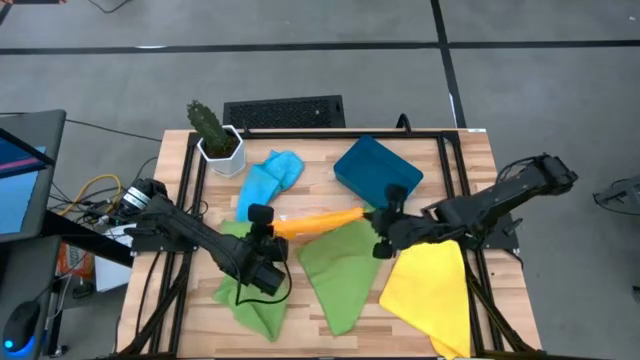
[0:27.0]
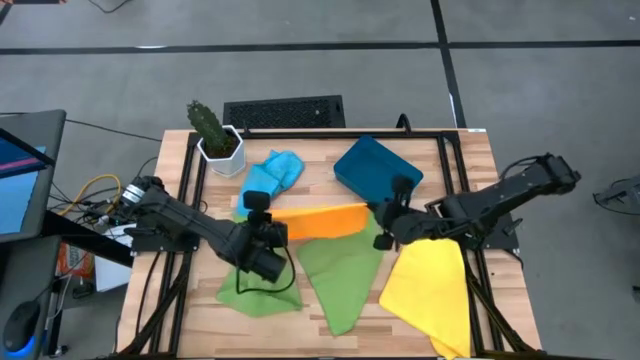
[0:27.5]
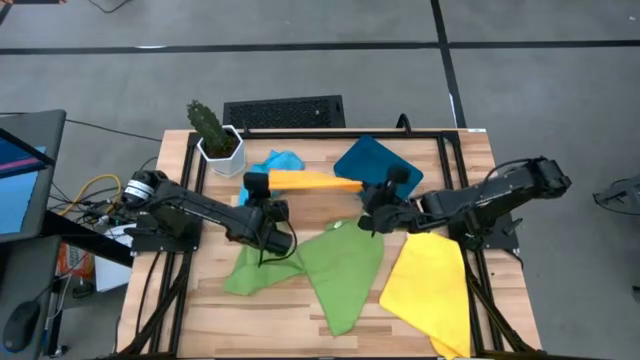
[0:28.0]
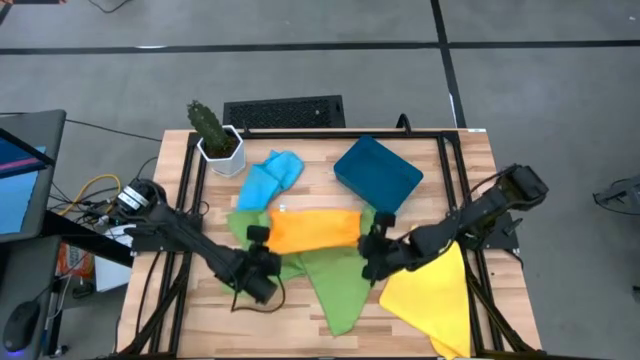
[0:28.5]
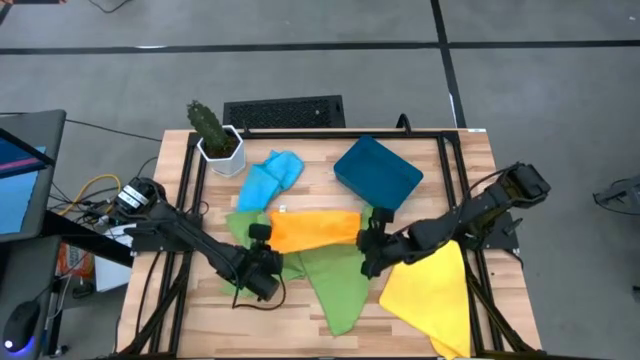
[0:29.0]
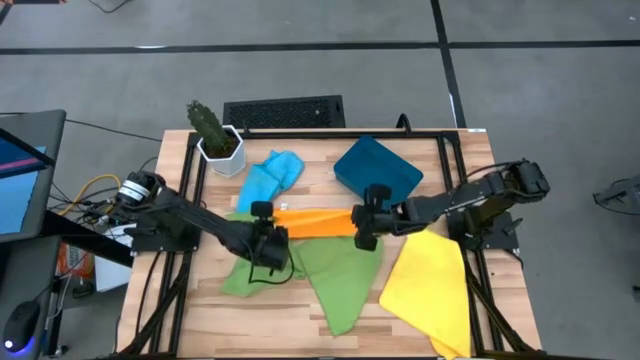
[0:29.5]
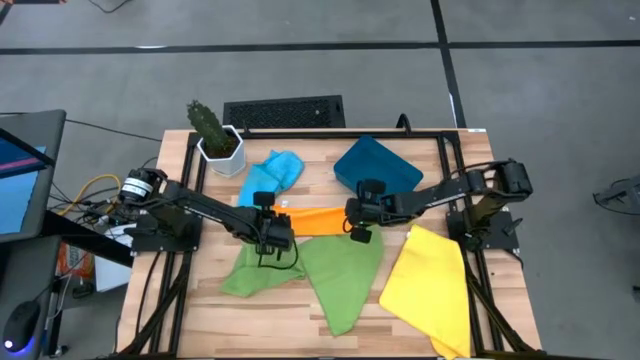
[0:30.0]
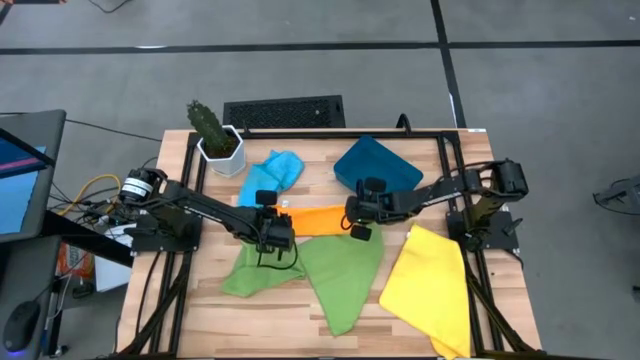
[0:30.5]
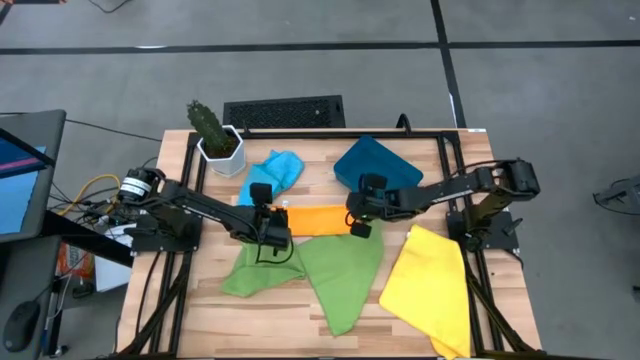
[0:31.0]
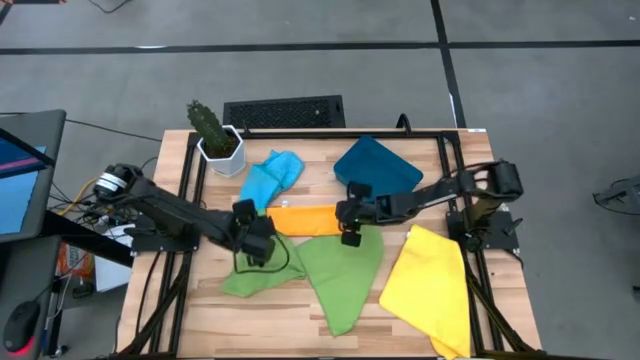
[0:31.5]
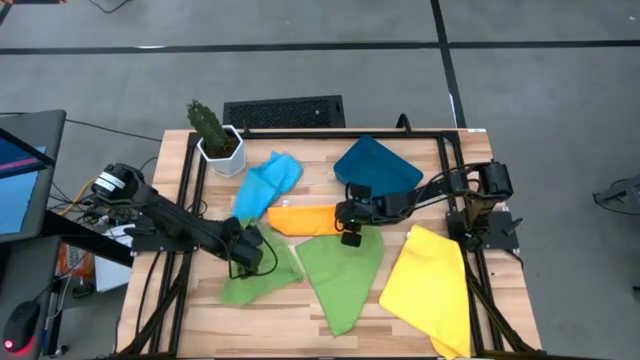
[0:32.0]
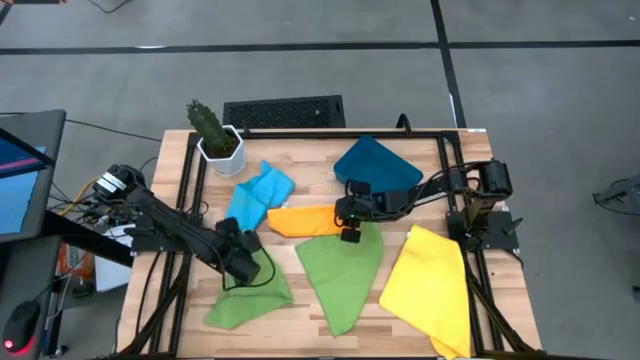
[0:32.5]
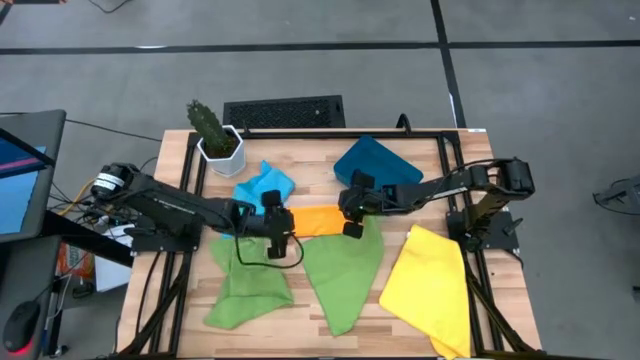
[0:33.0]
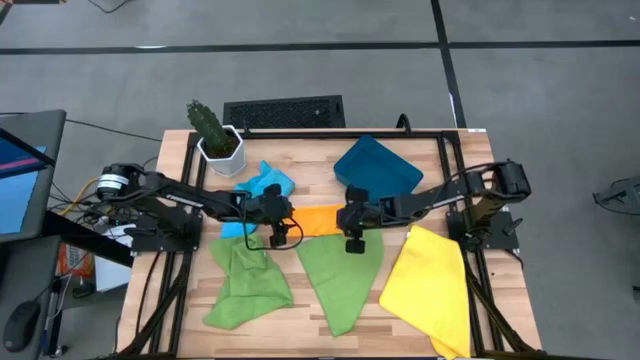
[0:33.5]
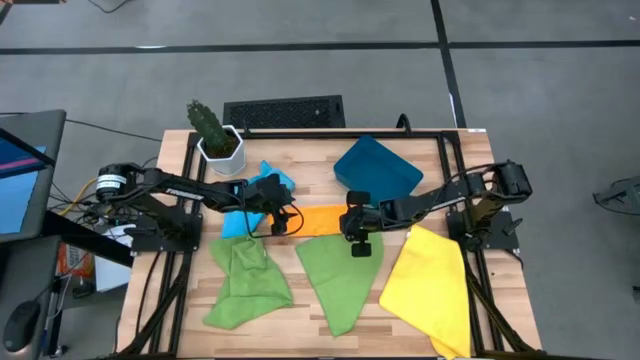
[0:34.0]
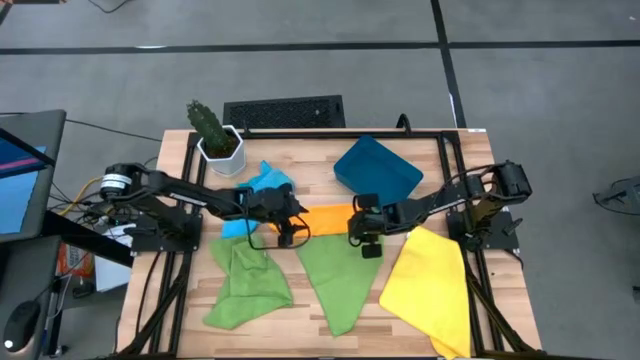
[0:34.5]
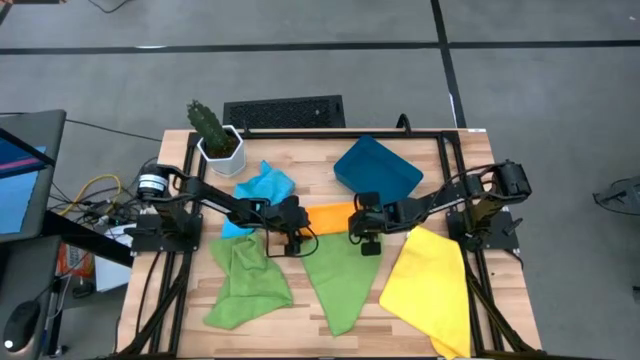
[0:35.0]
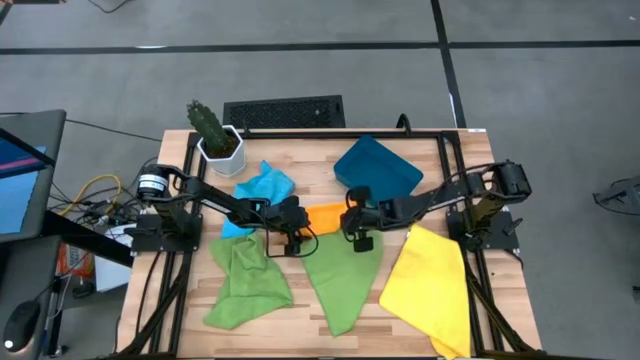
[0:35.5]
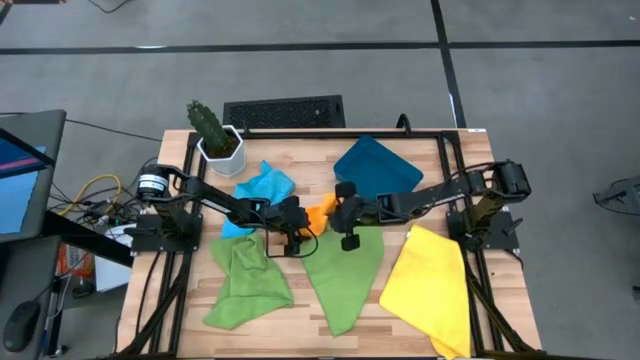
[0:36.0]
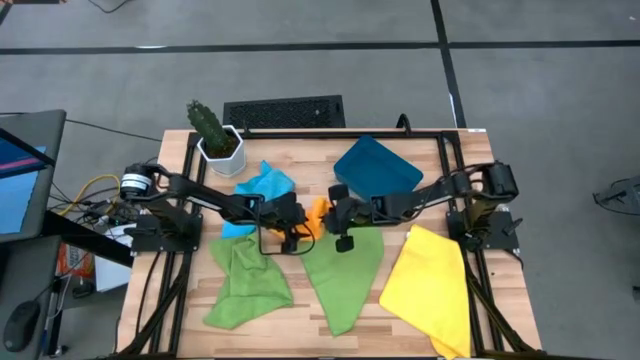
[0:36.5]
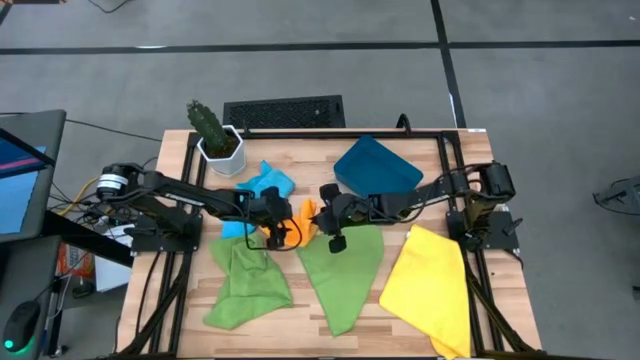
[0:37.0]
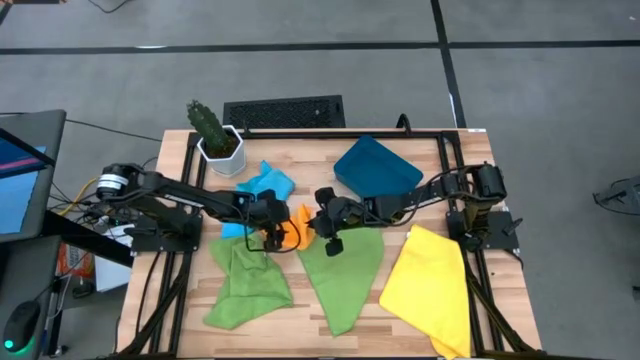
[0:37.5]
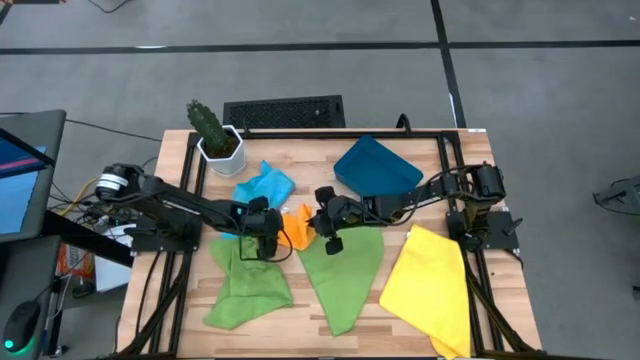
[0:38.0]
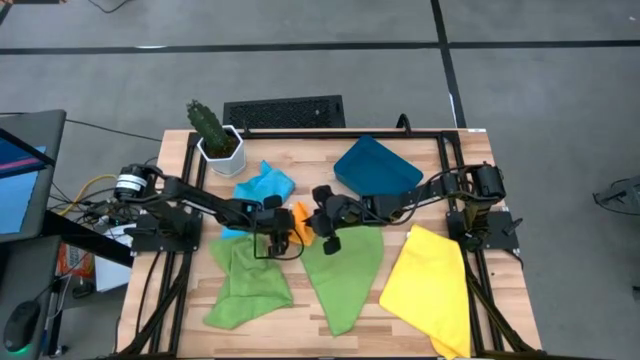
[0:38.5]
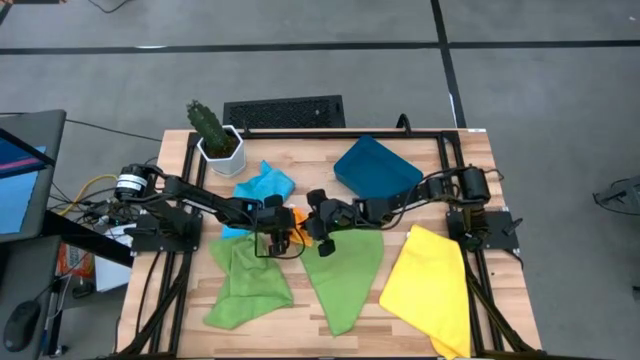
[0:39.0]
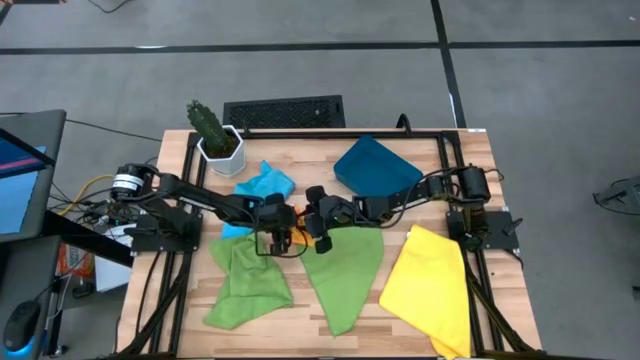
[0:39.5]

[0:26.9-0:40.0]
Task: Fold microfiber towels
Fold the orange microfiber towel

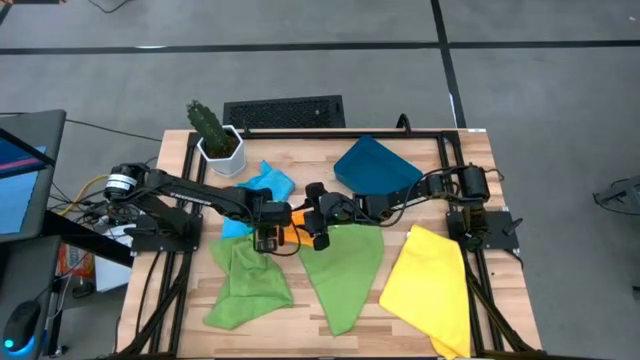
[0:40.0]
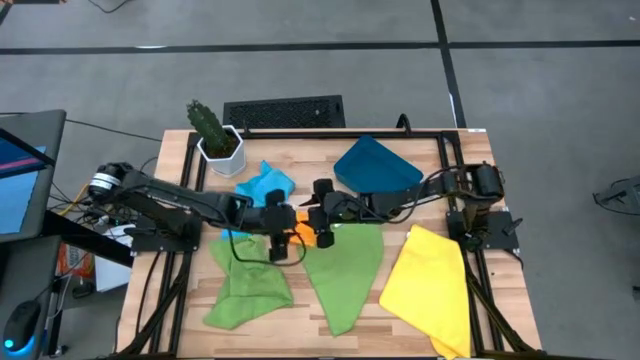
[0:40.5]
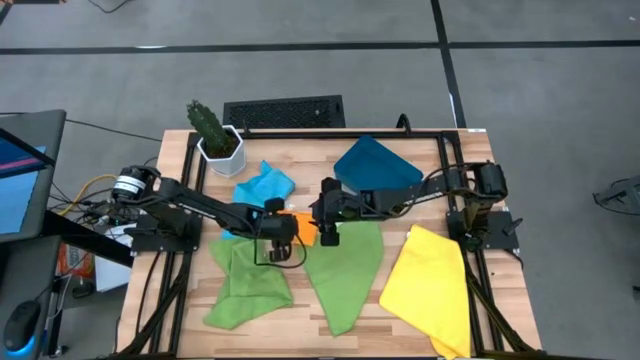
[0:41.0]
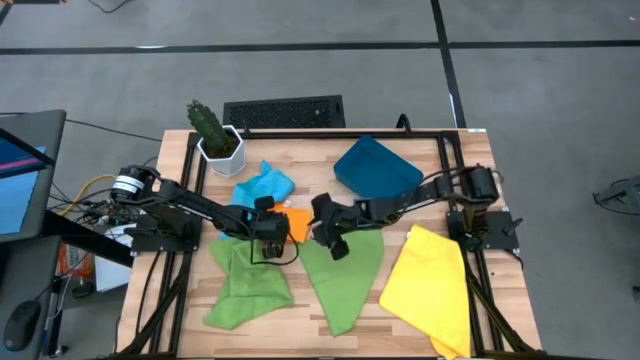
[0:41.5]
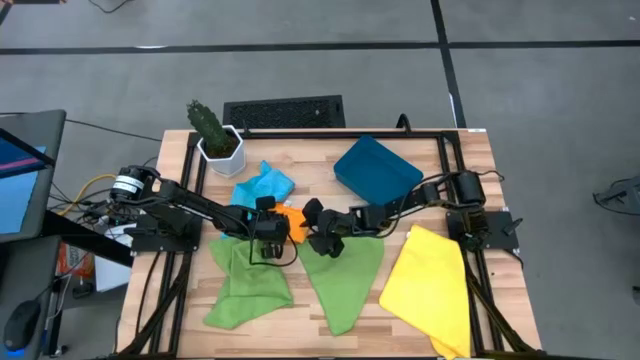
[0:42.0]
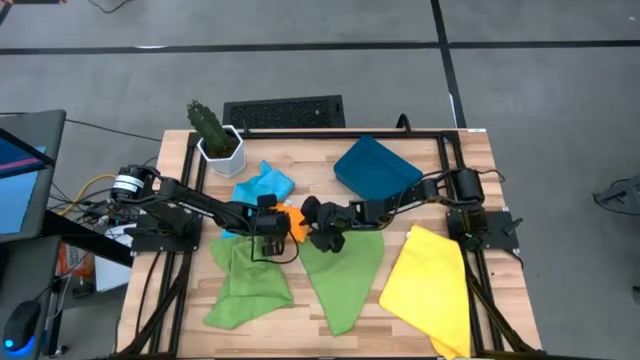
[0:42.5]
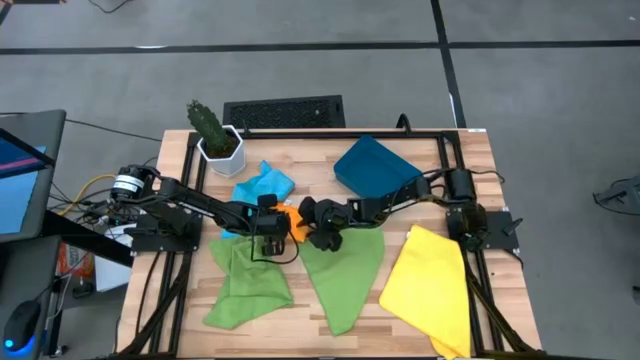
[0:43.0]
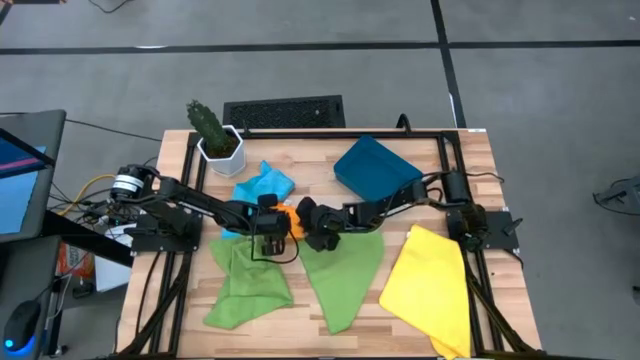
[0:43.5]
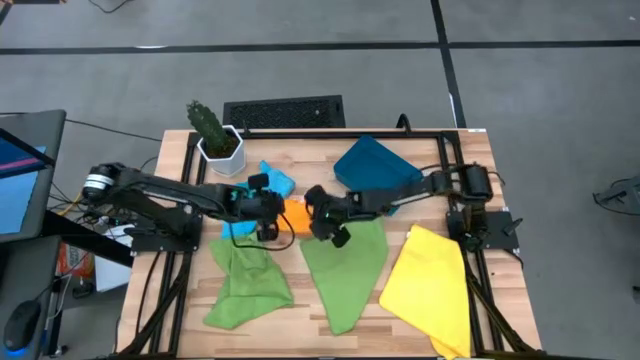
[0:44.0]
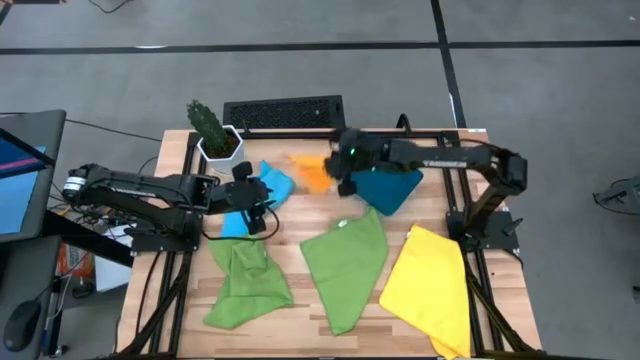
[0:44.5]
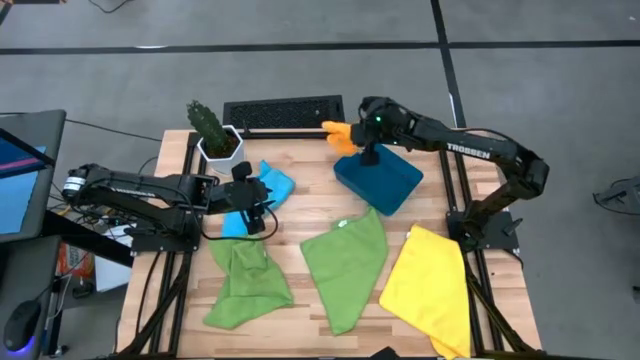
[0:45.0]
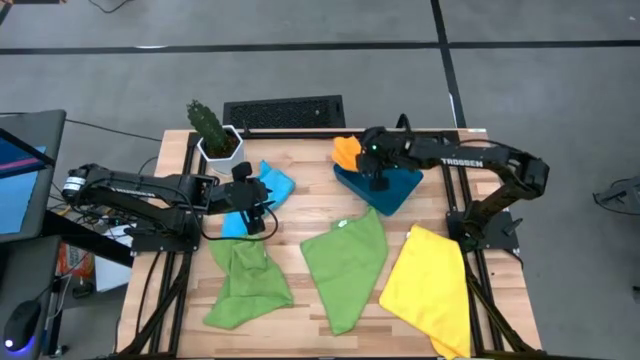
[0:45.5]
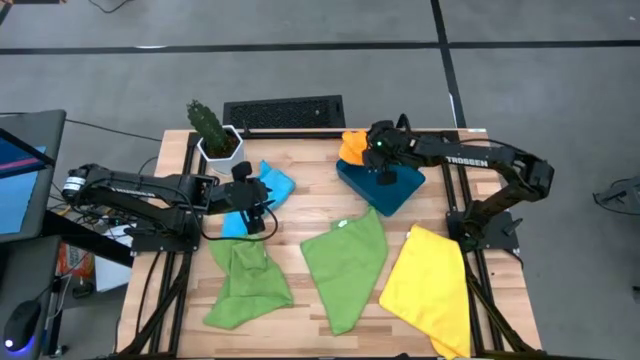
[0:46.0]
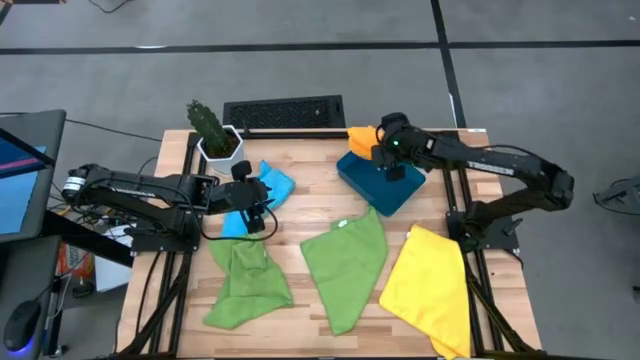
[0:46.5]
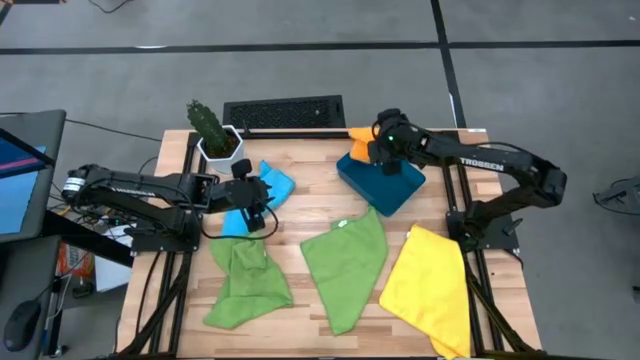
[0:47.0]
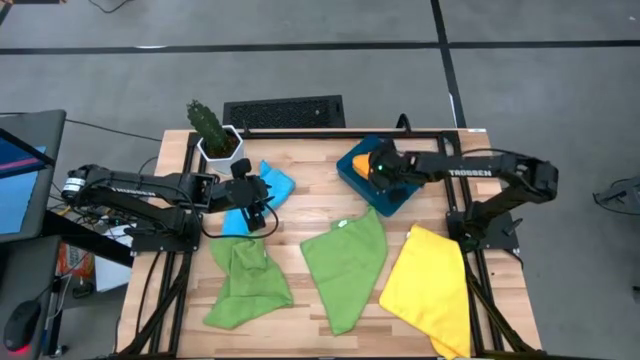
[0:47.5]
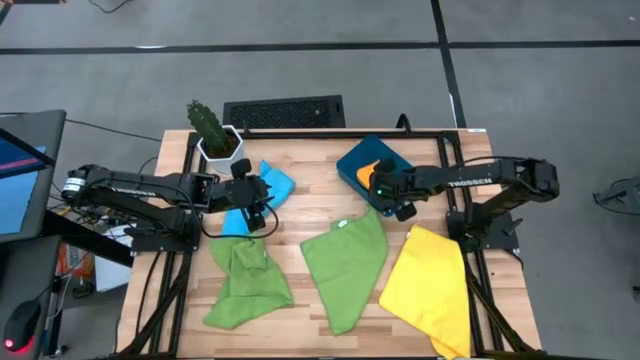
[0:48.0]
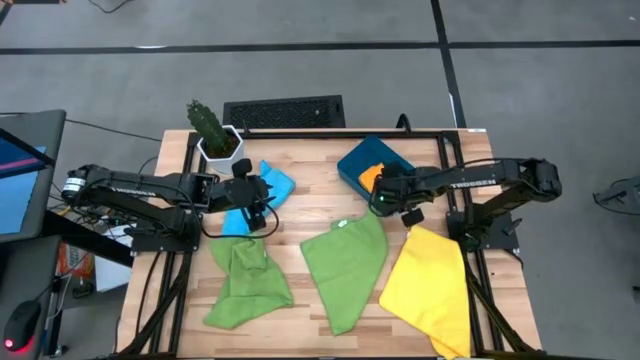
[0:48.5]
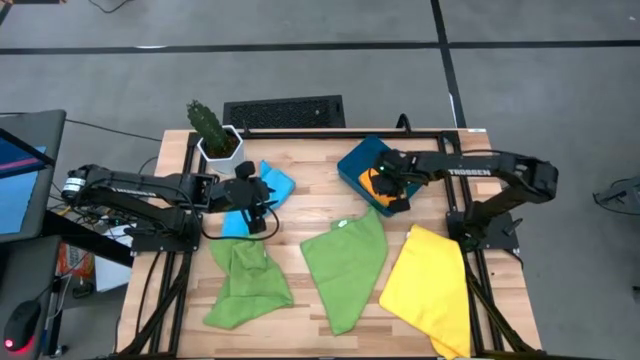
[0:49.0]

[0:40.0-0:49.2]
Put the folded orange microfiber towel into the blue bin
